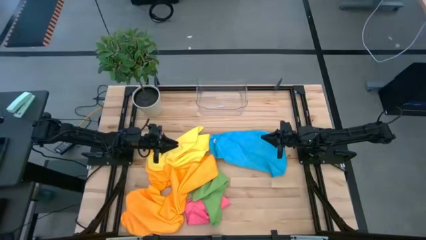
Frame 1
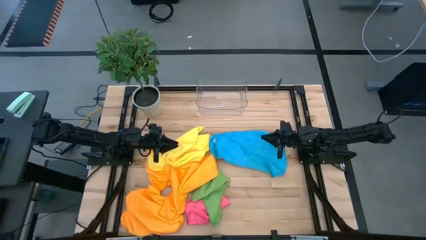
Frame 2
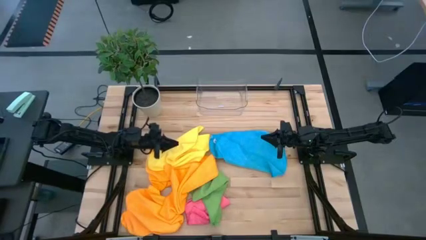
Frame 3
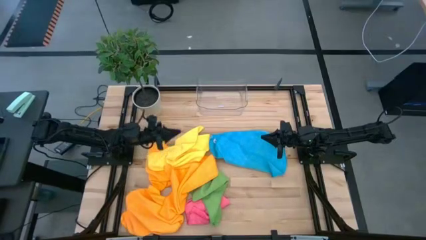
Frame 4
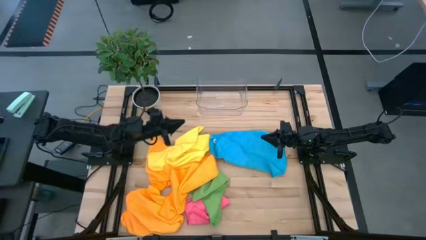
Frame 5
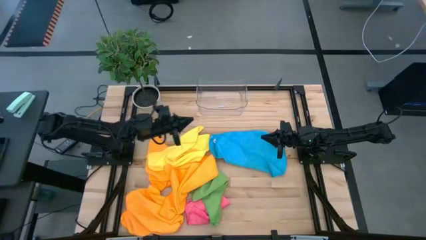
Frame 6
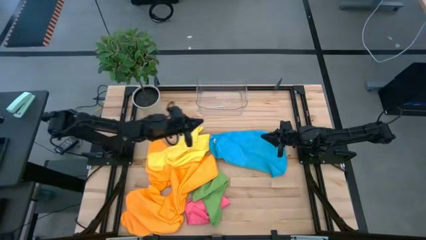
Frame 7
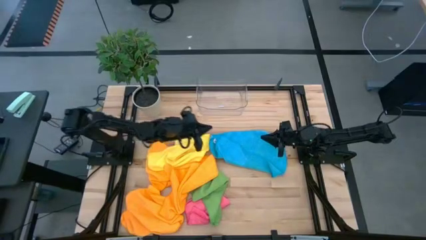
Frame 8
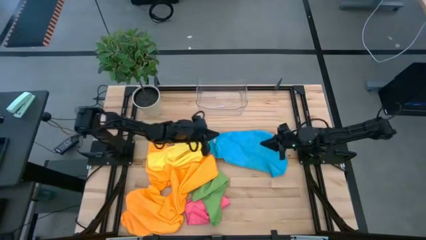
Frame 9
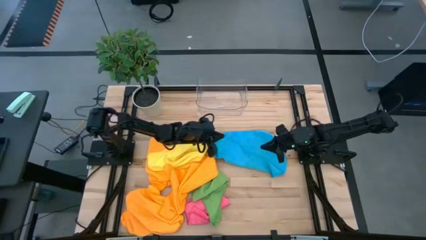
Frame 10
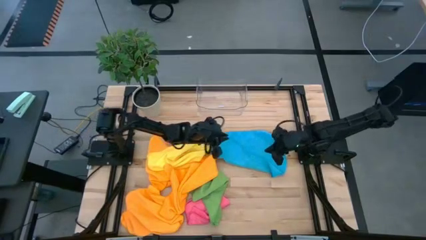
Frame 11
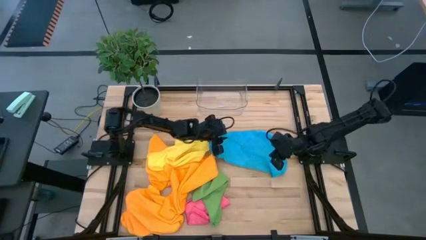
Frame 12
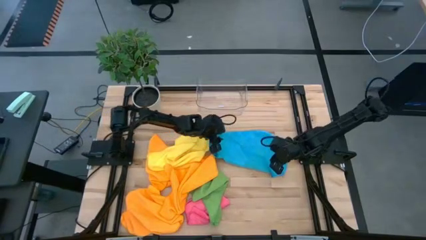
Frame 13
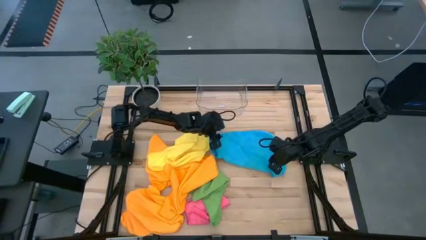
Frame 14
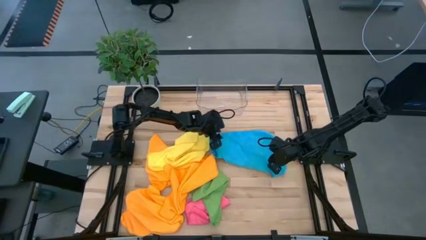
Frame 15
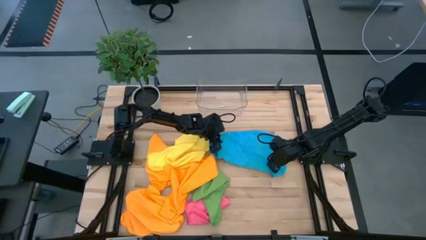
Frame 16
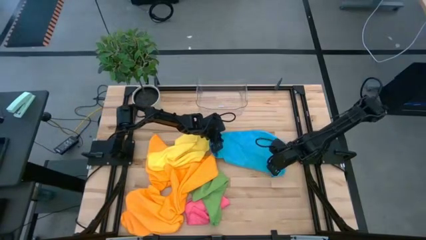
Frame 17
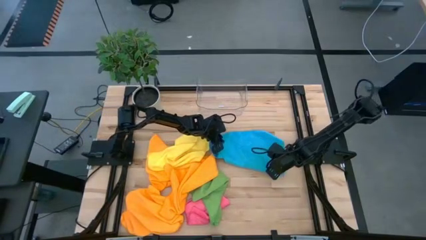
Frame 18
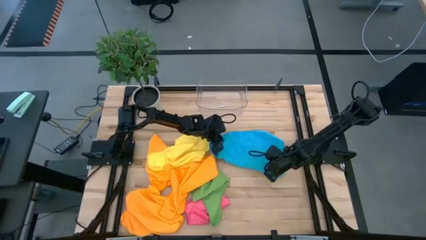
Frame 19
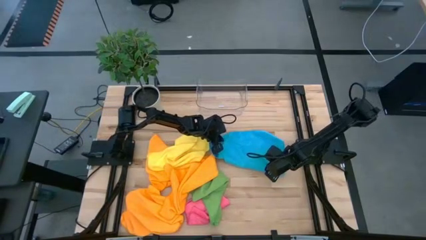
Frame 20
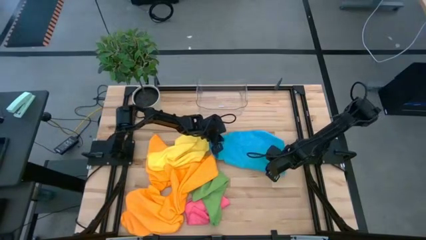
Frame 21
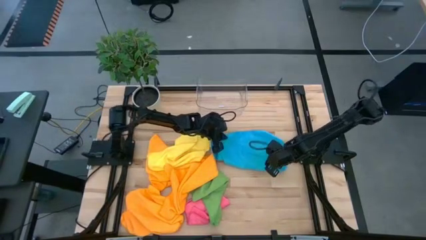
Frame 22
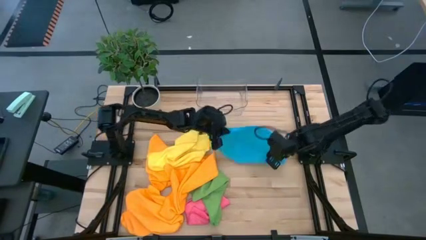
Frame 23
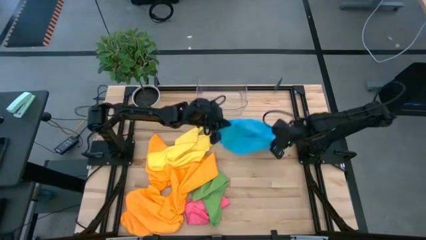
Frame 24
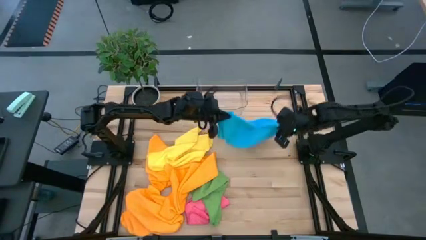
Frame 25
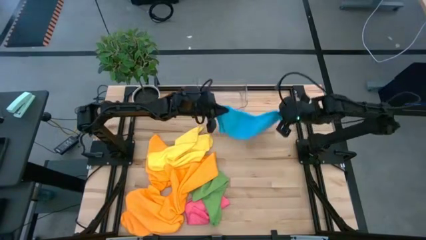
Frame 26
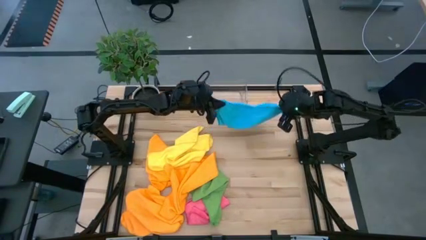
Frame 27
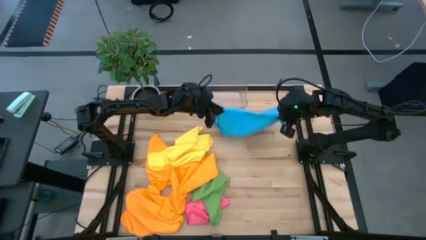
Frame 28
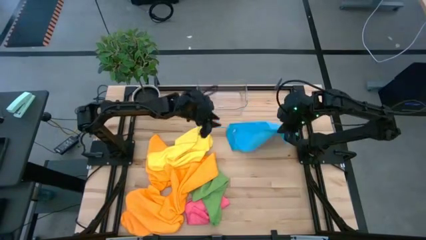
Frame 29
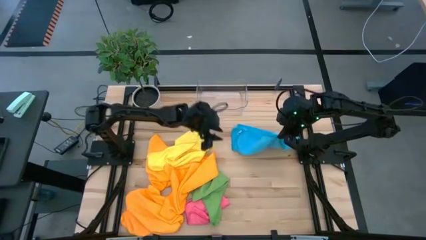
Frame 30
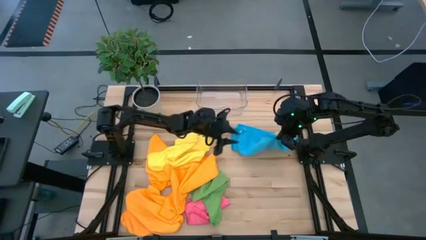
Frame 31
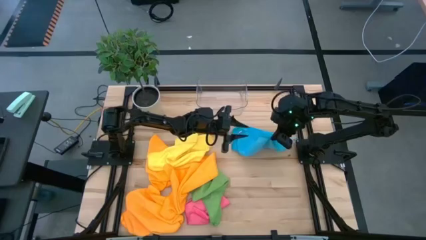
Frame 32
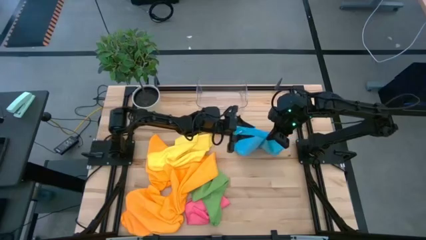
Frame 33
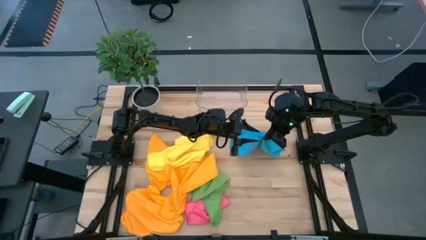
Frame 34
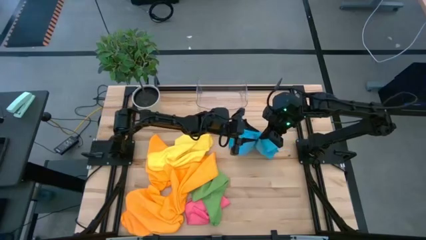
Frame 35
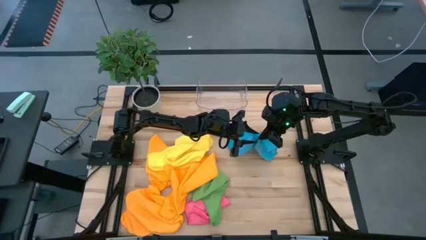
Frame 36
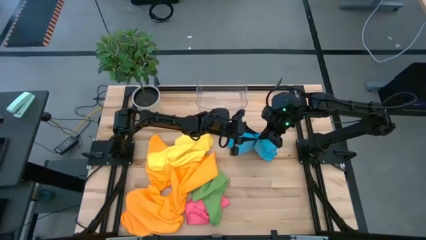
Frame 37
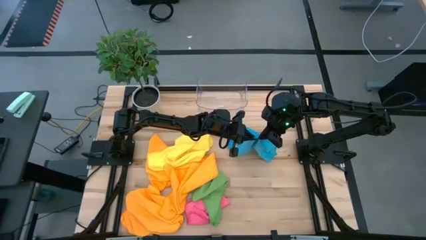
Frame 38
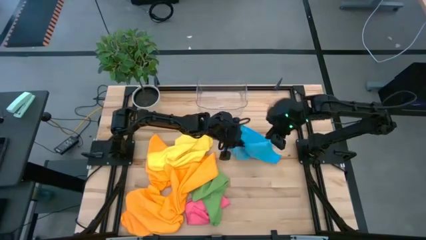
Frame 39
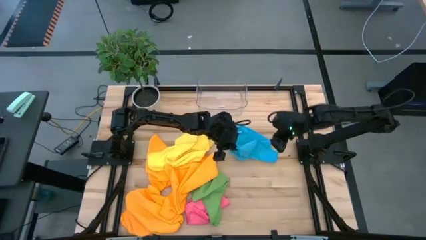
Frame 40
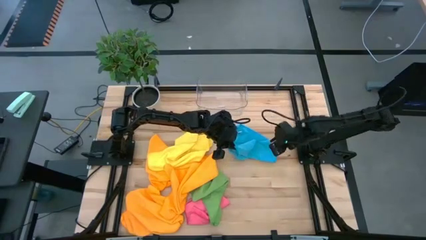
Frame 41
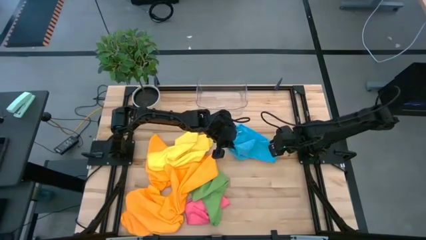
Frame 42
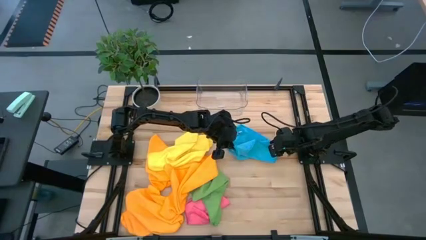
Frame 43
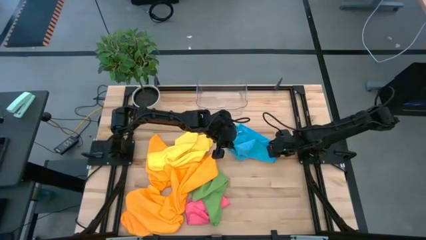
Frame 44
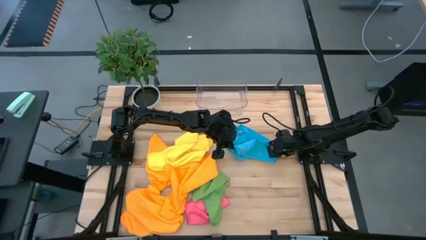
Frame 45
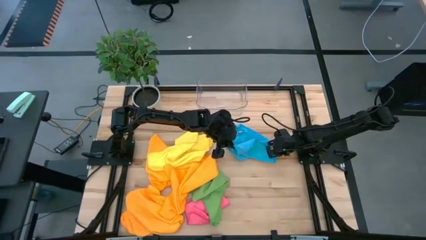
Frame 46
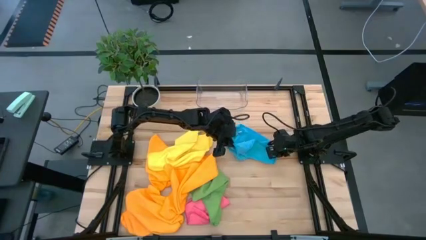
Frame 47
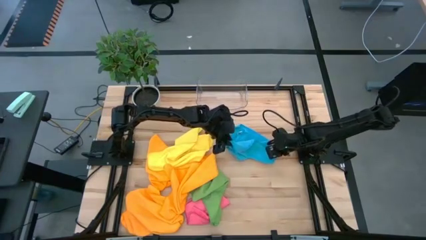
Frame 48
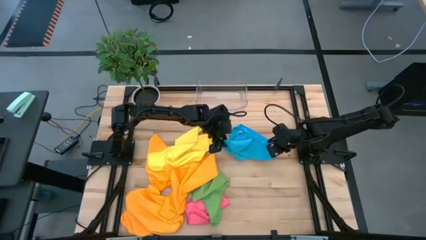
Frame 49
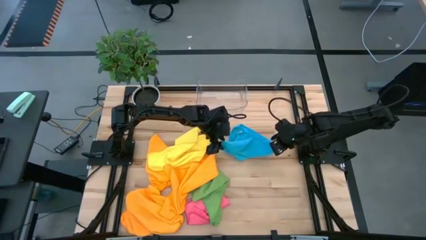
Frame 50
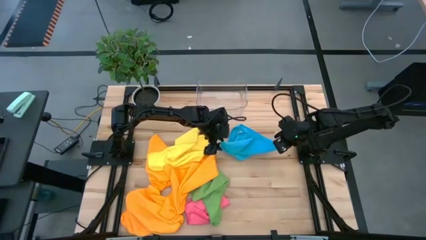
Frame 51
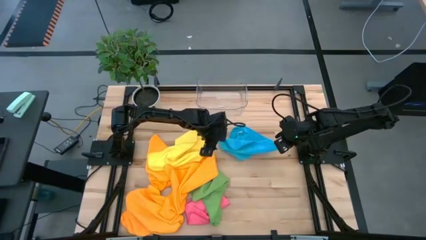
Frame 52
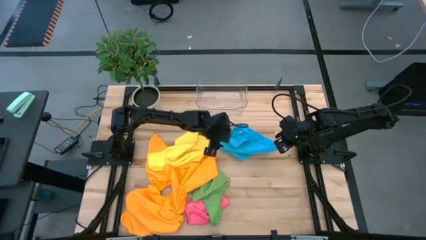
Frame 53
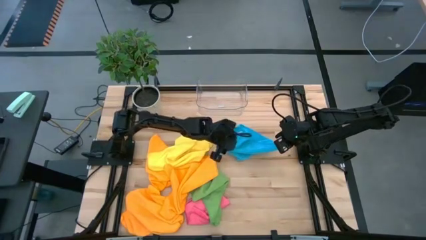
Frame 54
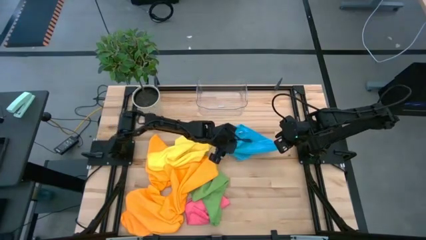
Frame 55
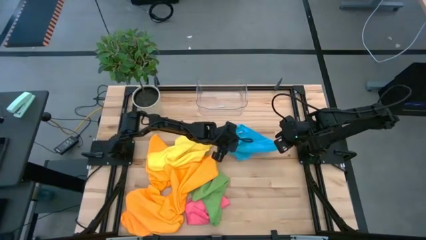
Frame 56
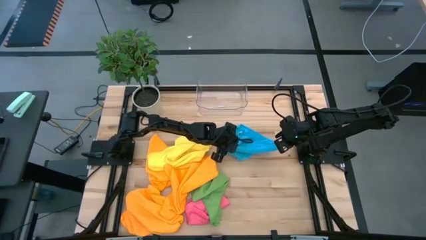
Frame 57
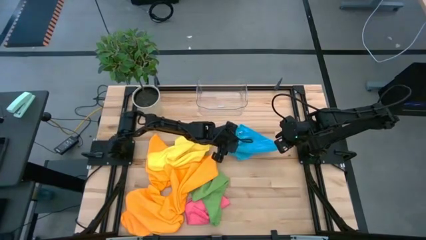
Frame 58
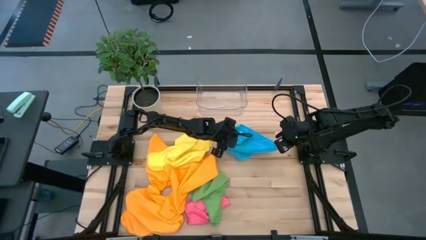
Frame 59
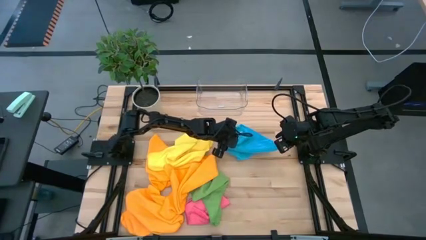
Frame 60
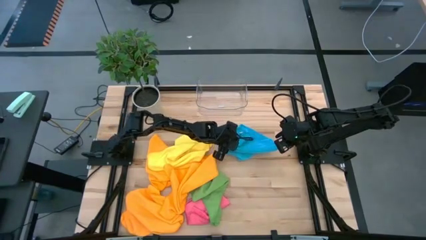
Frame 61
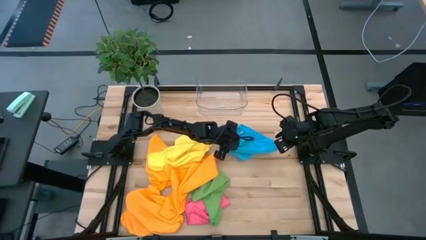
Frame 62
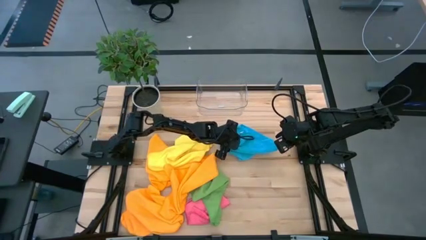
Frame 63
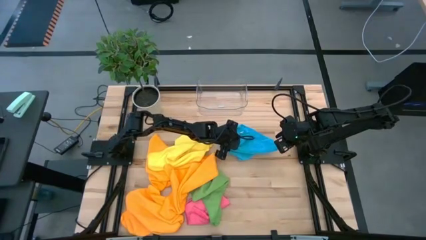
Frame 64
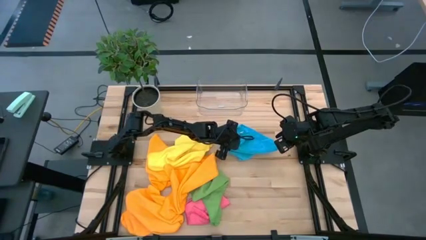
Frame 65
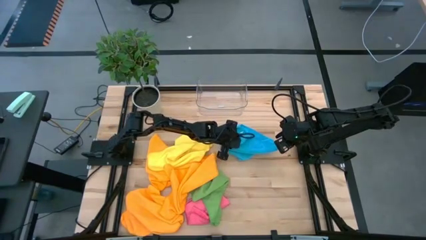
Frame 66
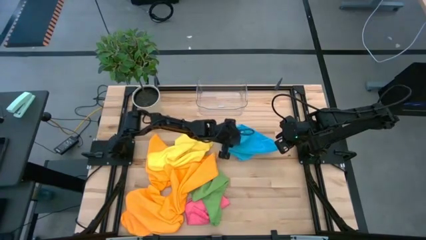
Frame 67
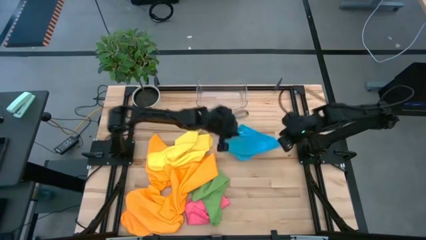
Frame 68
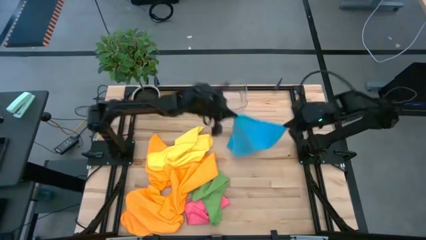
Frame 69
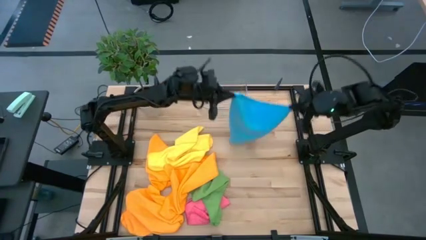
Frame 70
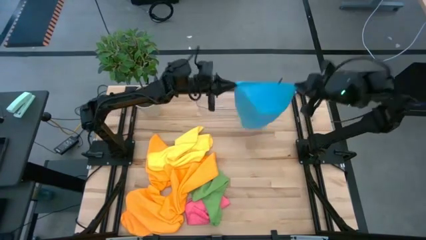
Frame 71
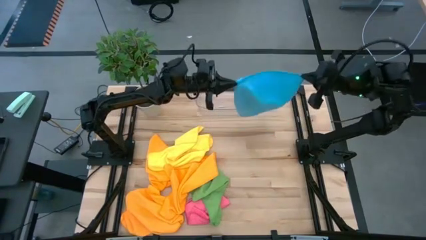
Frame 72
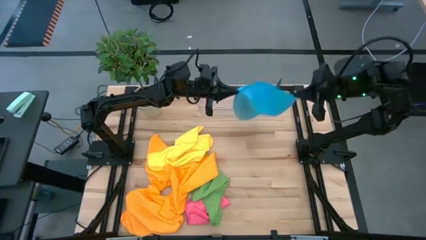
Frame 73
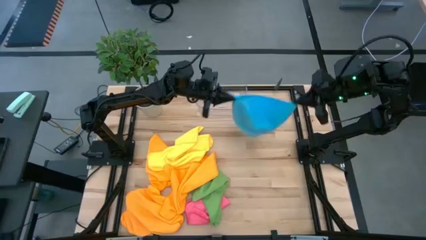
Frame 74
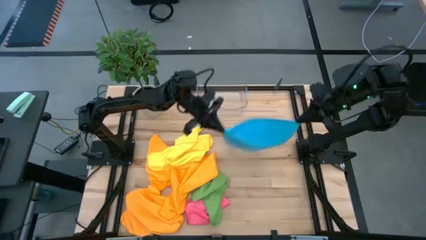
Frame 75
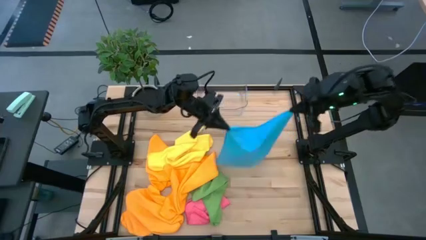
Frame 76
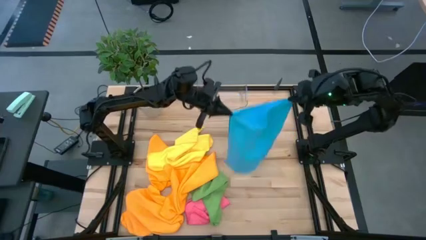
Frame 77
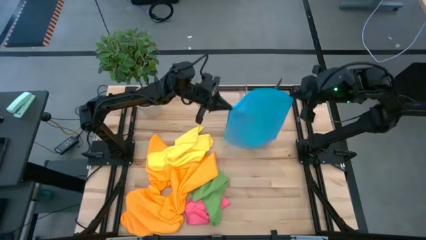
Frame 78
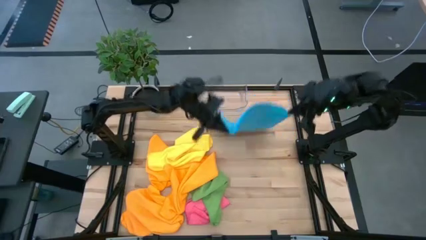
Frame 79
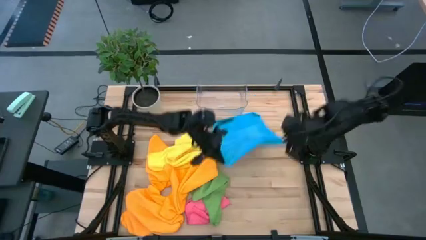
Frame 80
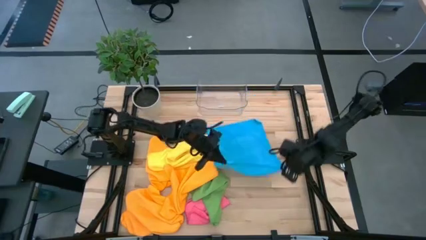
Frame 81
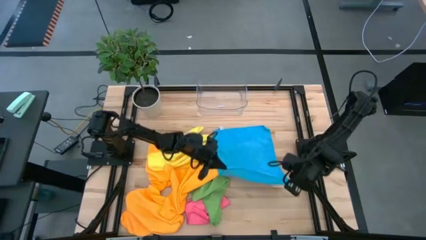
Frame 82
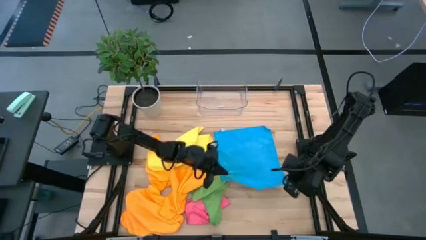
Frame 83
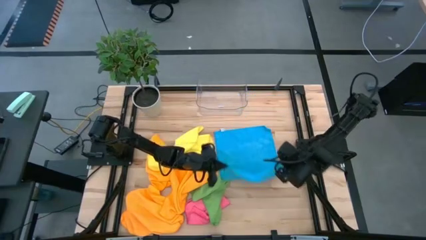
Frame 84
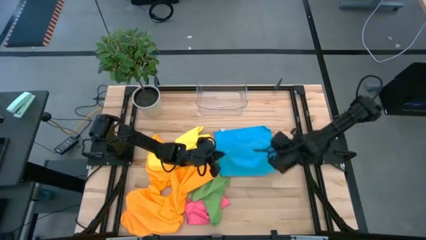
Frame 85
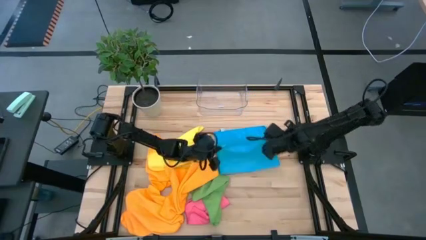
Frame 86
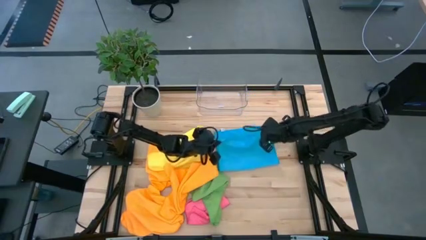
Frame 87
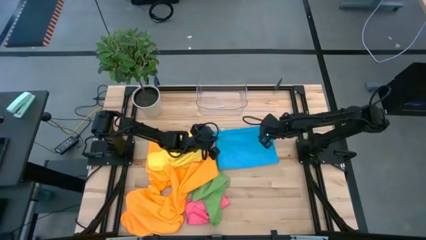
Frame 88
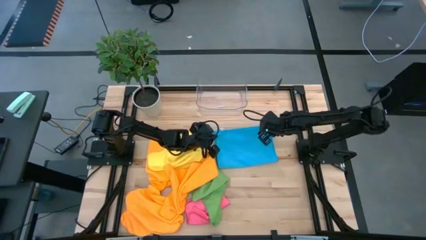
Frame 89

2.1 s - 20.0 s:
Task: Fold microfiber towels
Fold the blue towel
